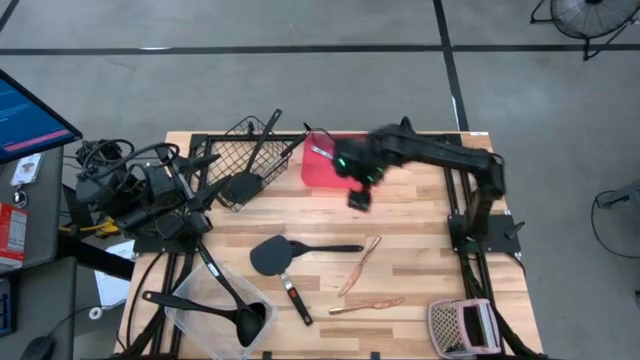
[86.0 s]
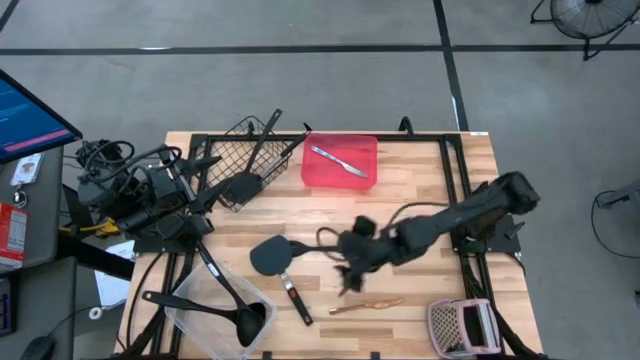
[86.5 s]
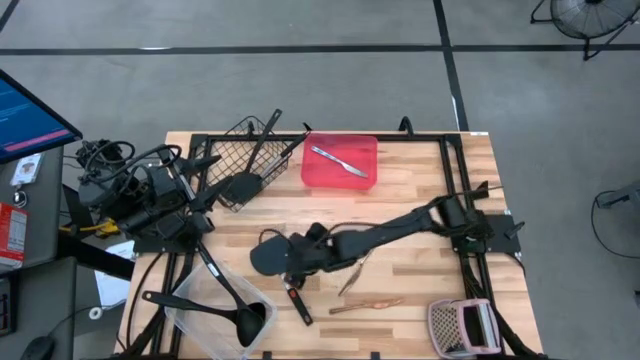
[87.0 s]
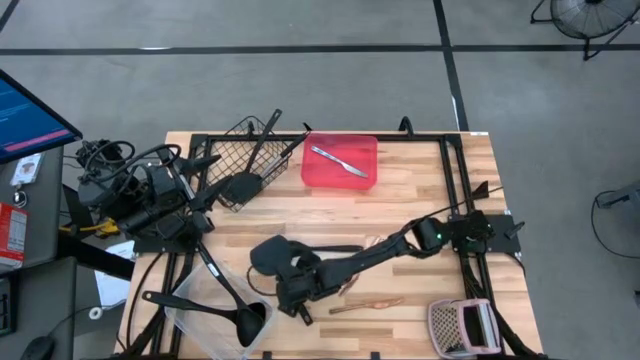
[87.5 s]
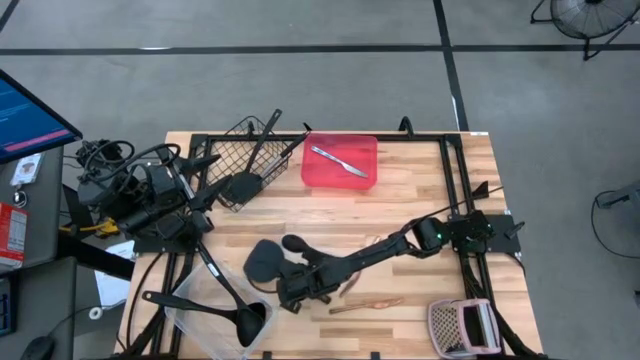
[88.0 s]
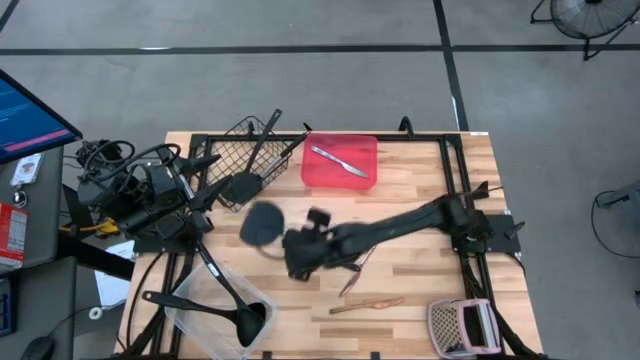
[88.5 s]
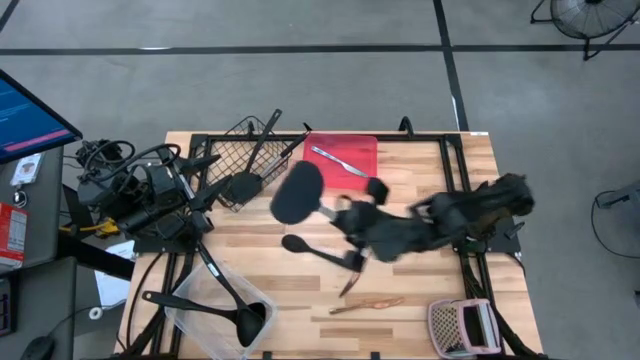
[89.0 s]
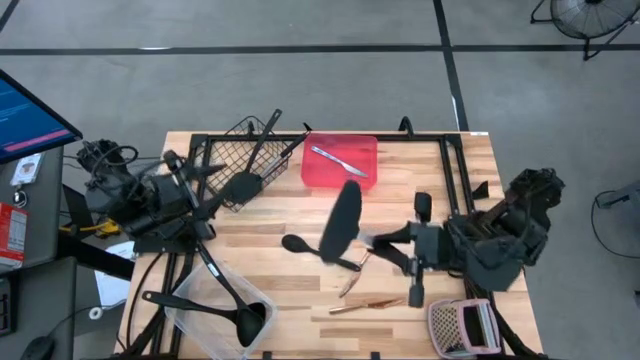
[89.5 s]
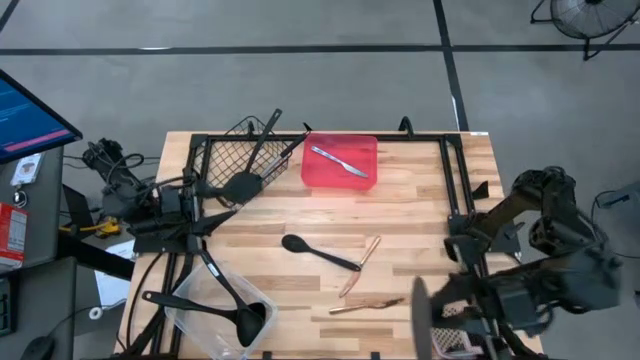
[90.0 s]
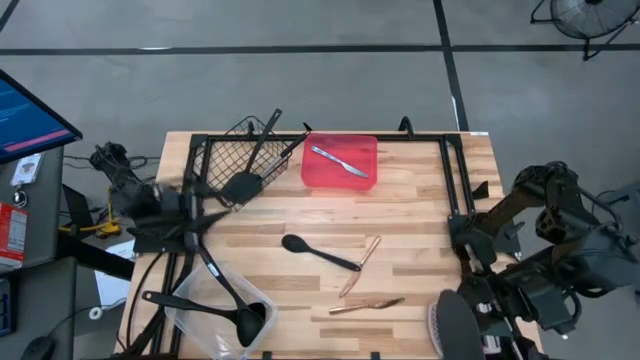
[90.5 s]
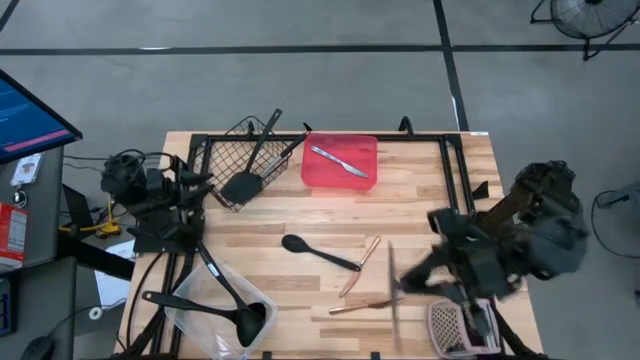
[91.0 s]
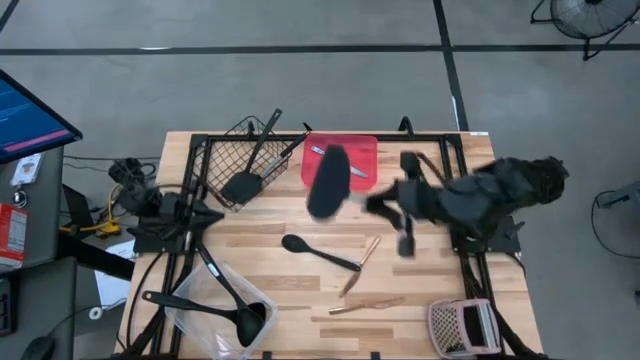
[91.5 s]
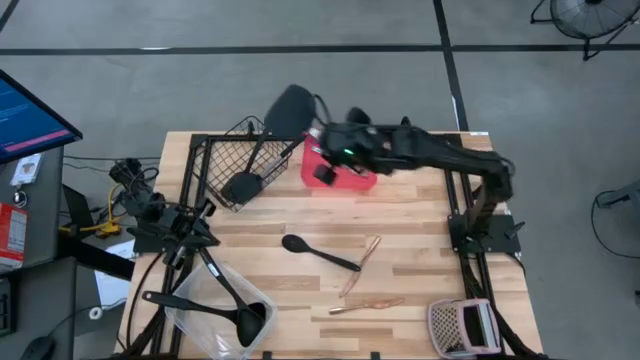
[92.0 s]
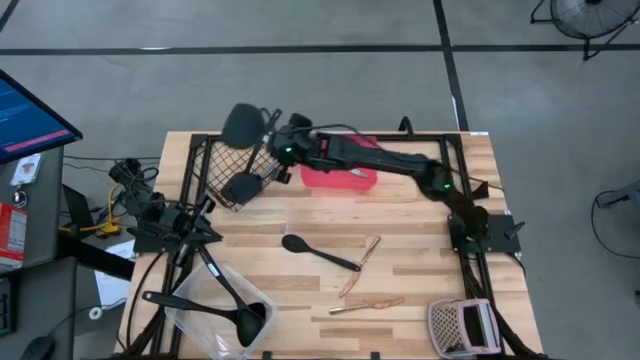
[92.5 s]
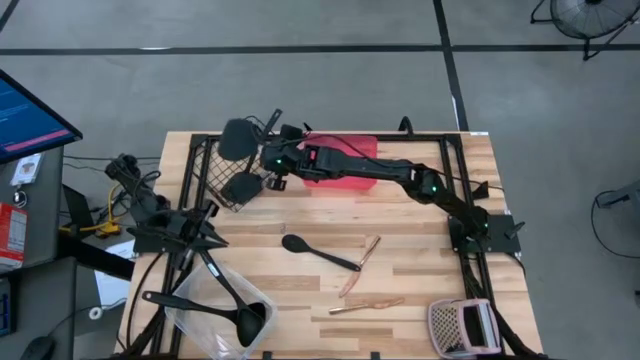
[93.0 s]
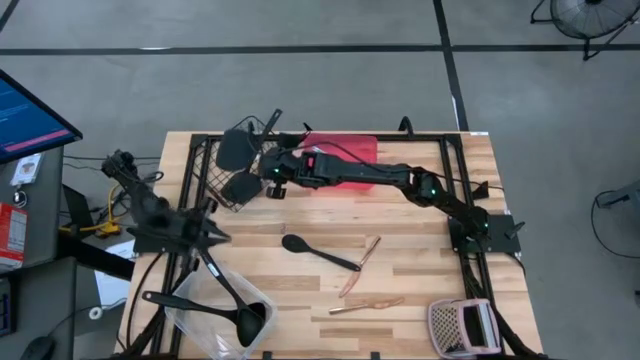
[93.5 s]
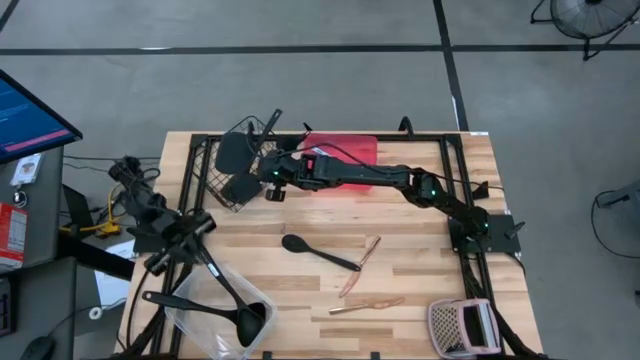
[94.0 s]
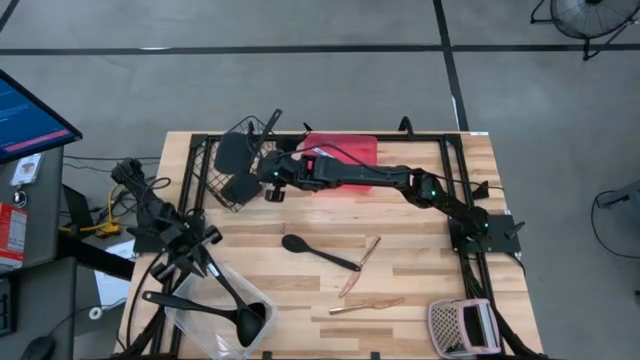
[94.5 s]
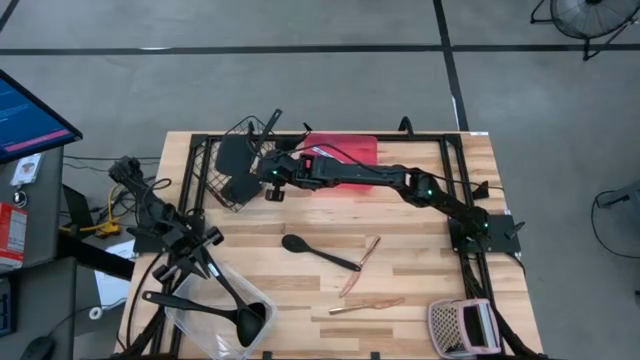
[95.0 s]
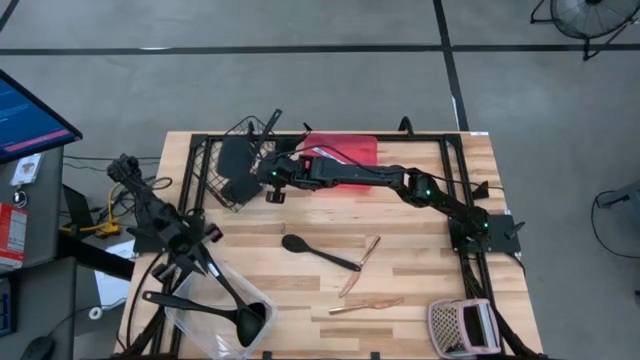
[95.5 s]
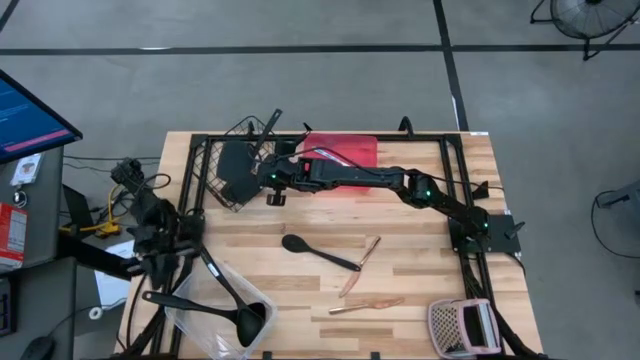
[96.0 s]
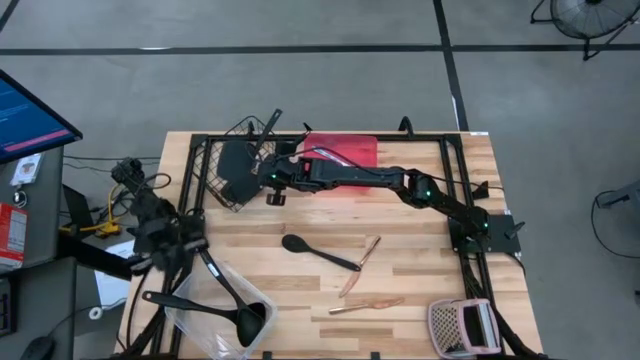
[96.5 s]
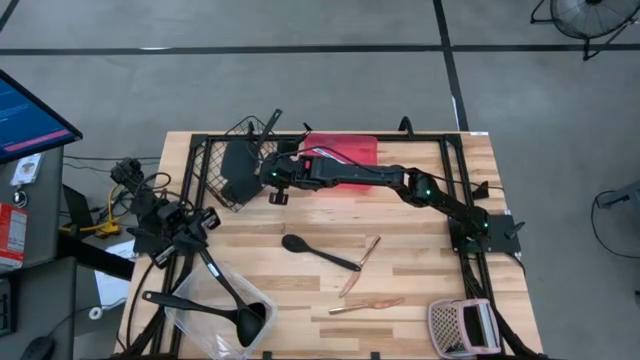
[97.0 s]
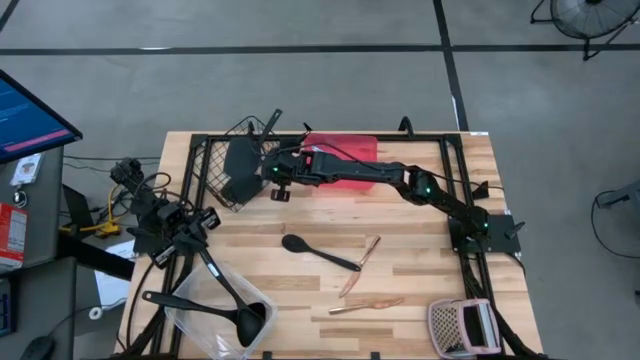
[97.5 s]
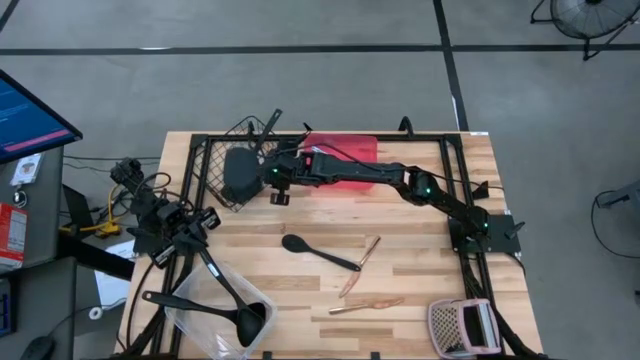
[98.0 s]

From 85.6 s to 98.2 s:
Task: Pick & Place Kitchen Items
Put the big spatula into the wire basket

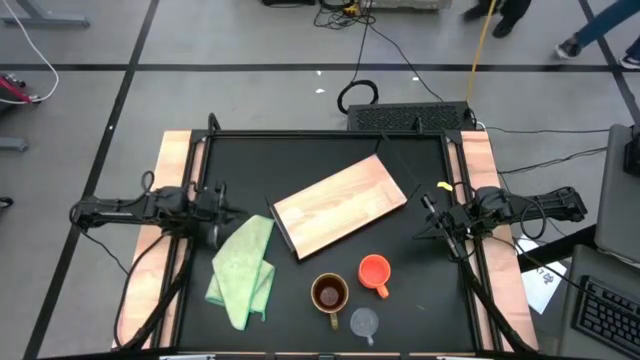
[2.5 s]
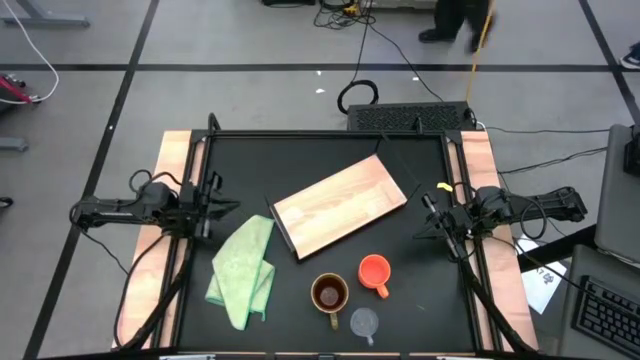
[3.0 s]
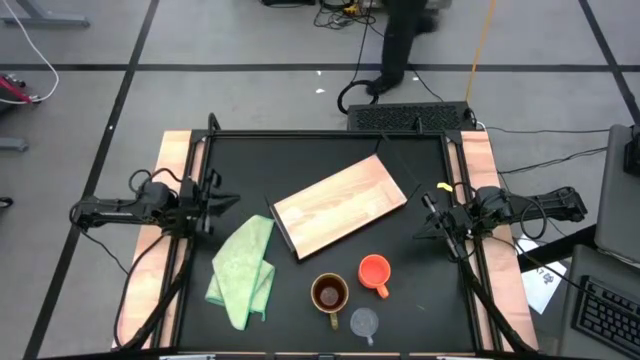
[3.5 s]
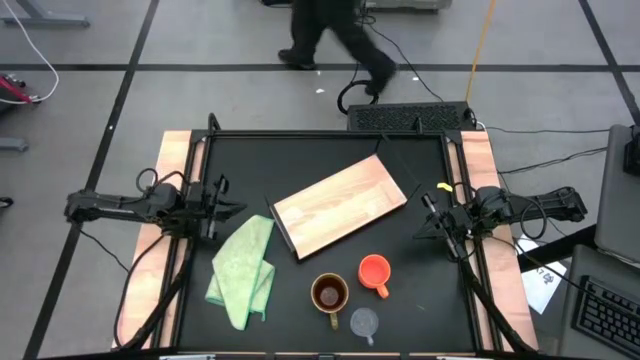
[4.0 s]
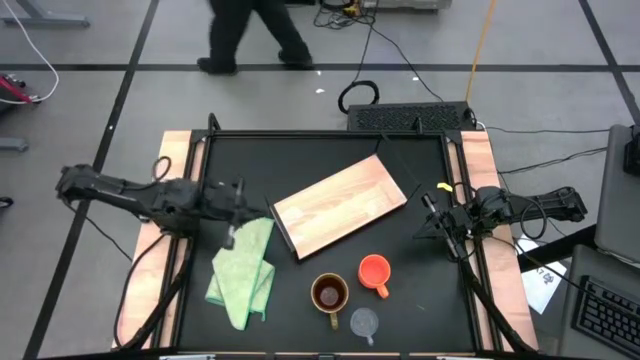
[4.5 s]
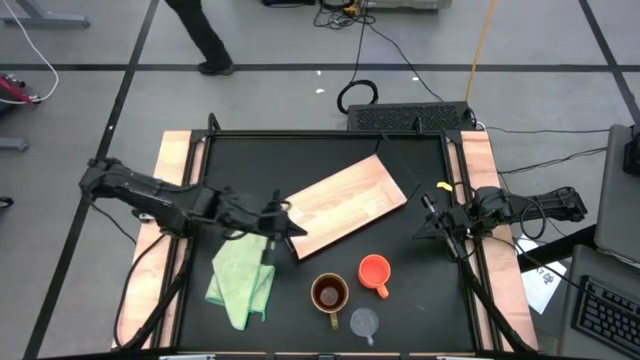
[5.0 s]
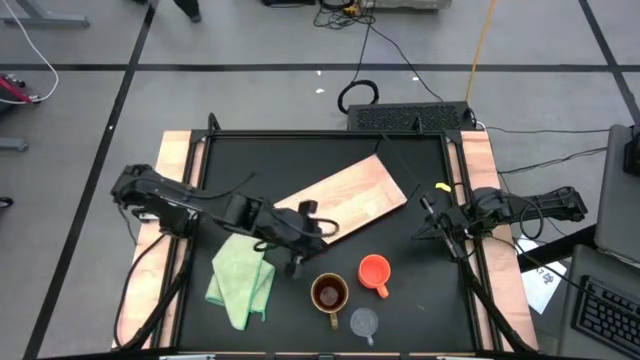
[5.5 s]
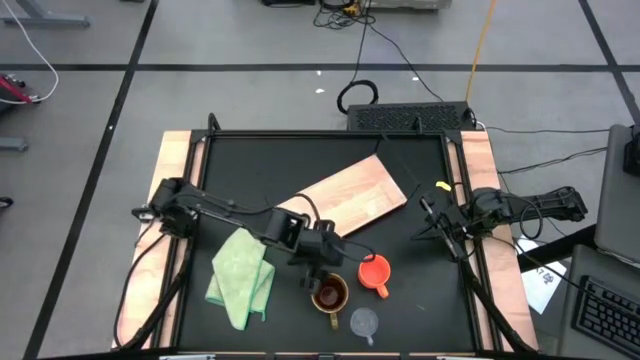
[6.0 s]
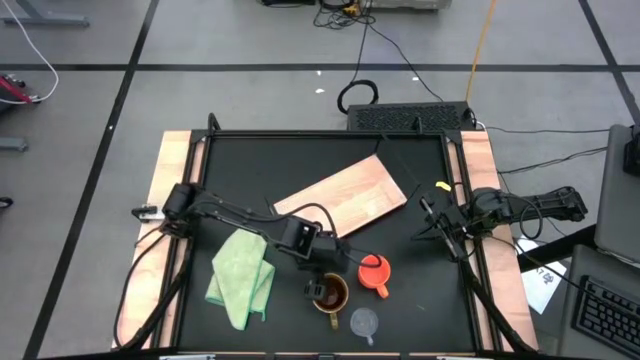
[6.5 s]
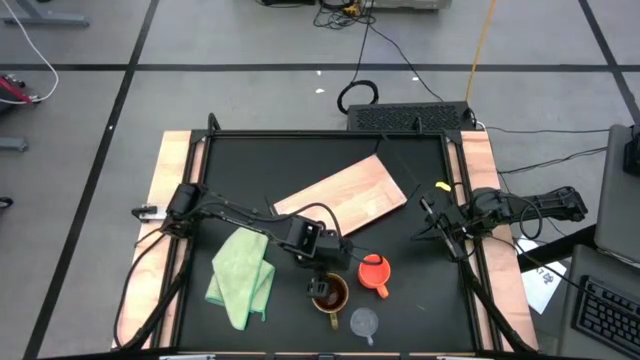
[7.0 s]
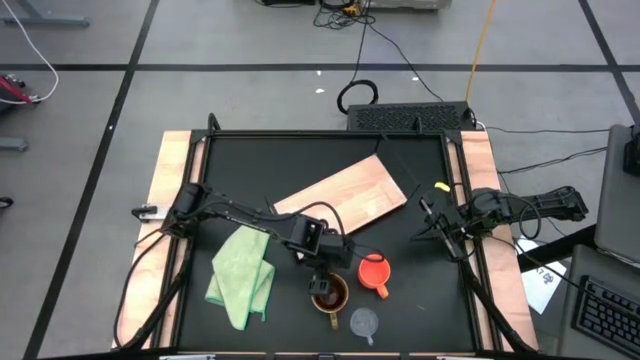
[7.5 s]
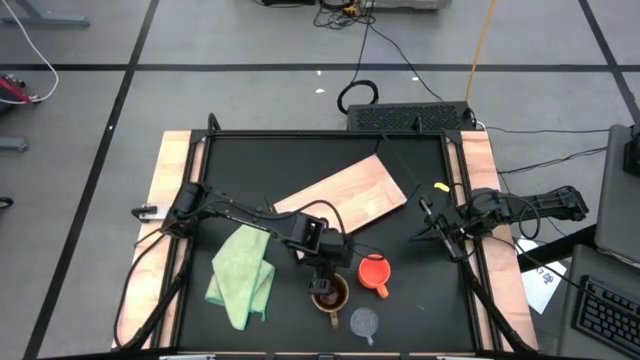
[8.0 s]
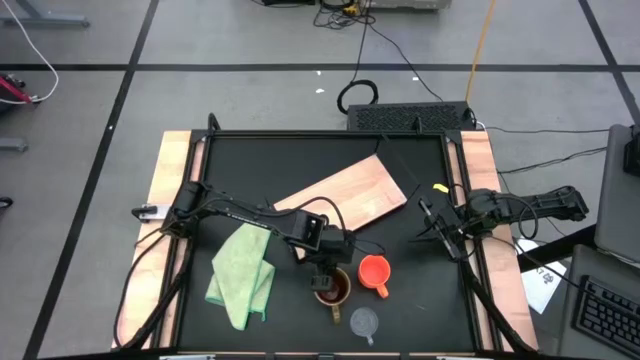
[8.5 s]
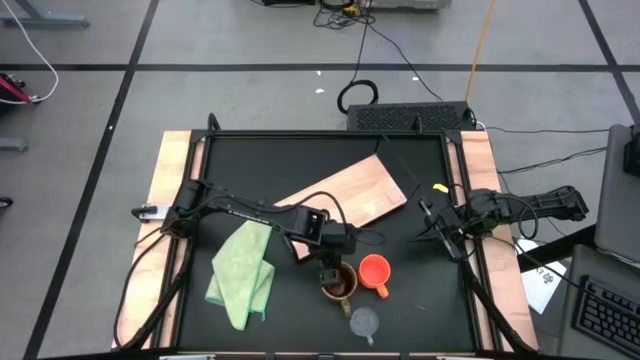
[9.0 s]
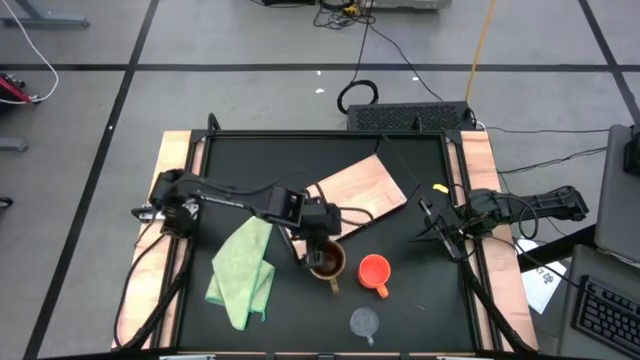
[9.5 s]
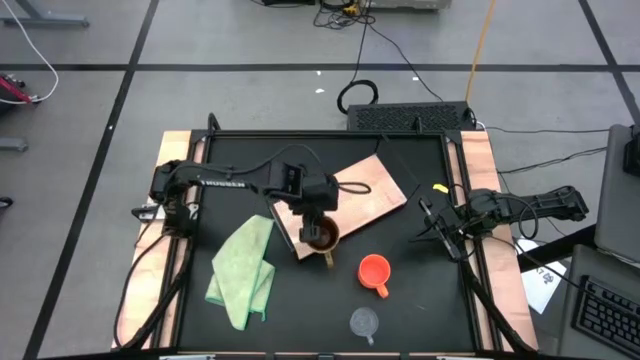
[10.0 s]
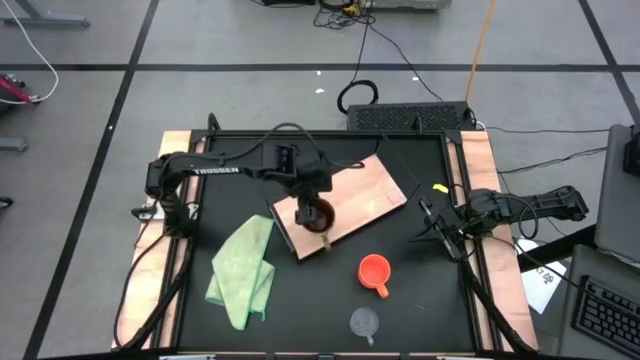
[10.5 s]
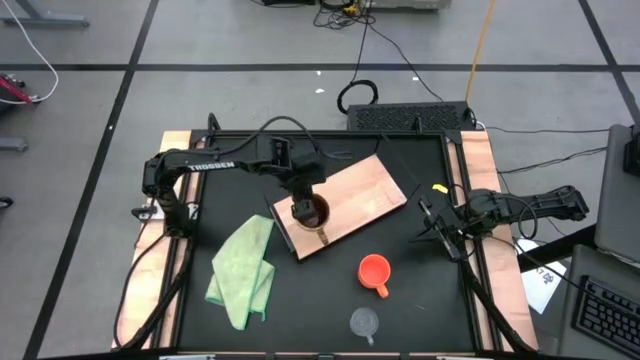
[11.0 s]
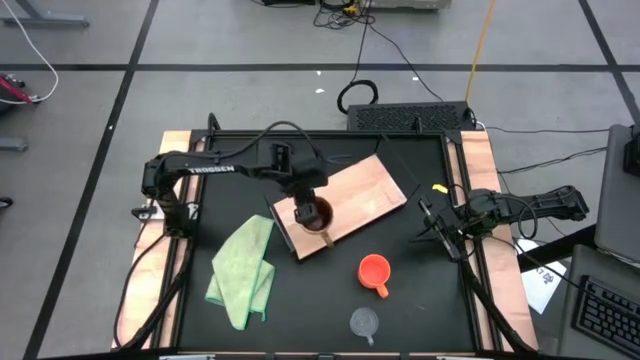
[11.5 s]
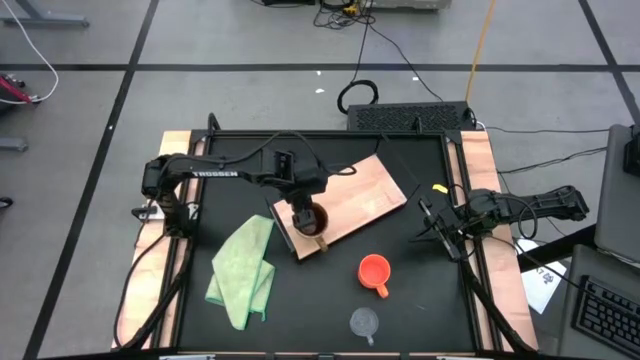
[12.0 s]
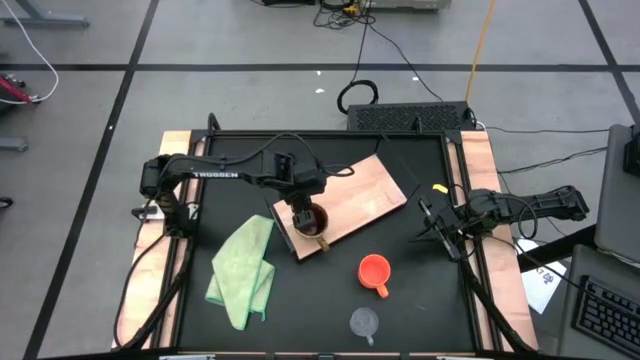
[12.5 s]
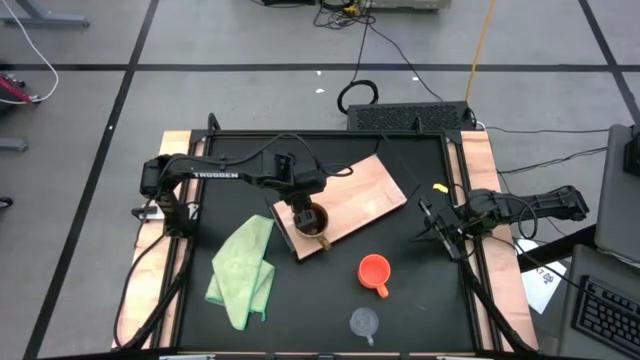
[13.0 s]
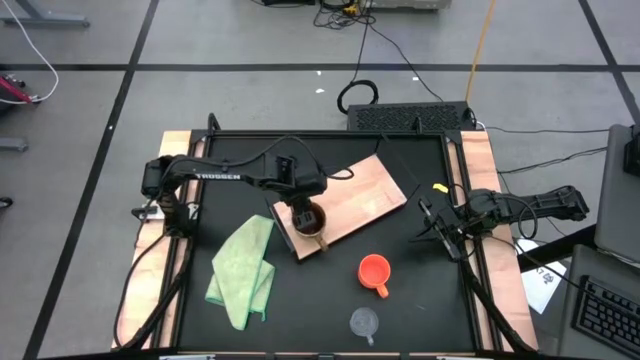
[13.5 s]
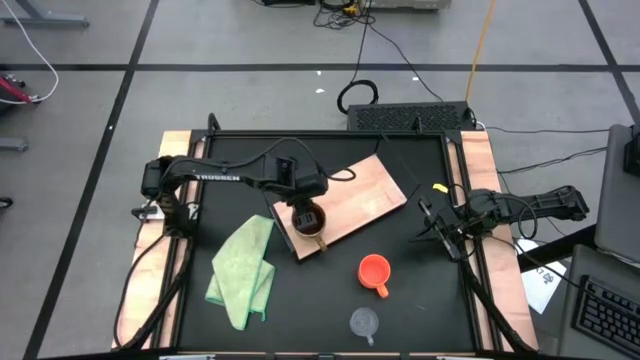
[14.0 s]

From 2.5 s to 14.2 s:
Task: Stack small to large cups/mugs on shelf
Put the green patterned mug on the shelf
